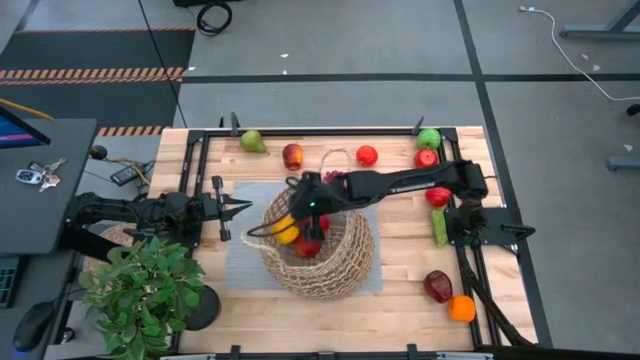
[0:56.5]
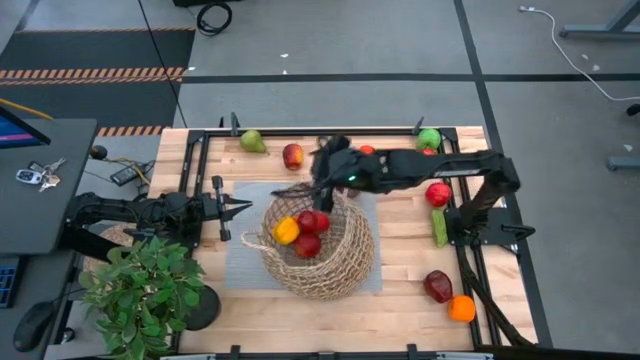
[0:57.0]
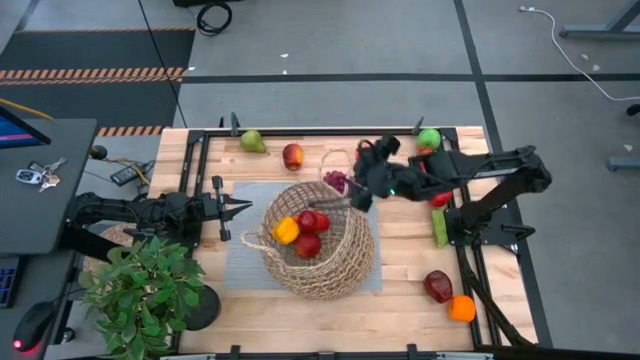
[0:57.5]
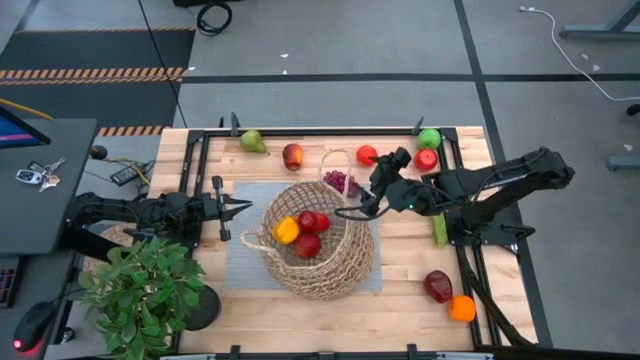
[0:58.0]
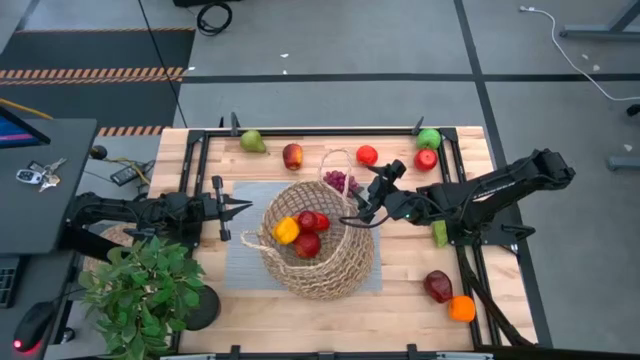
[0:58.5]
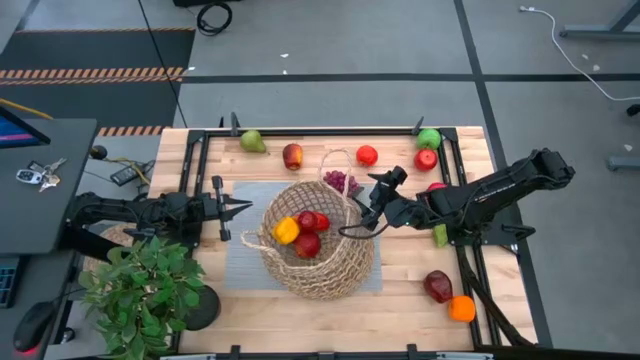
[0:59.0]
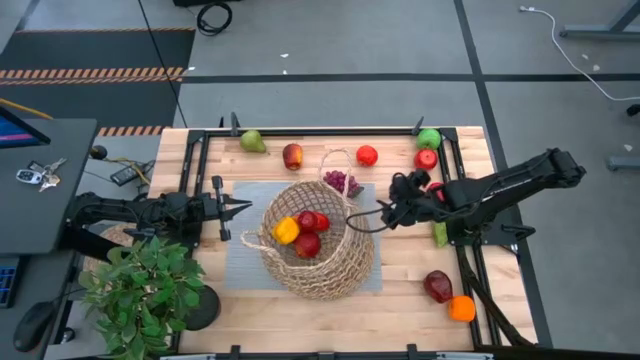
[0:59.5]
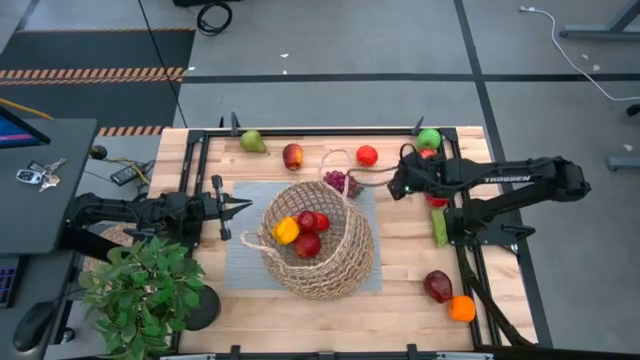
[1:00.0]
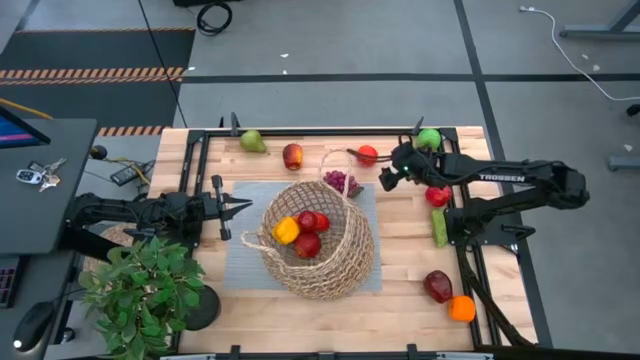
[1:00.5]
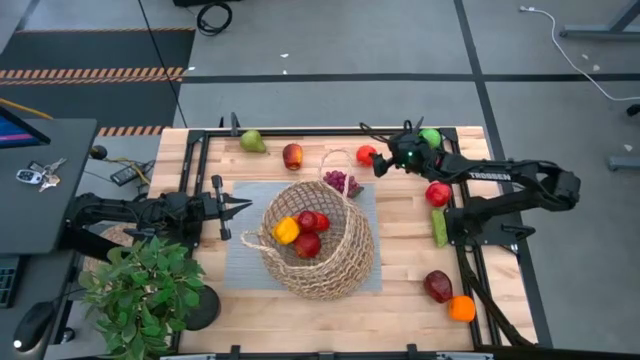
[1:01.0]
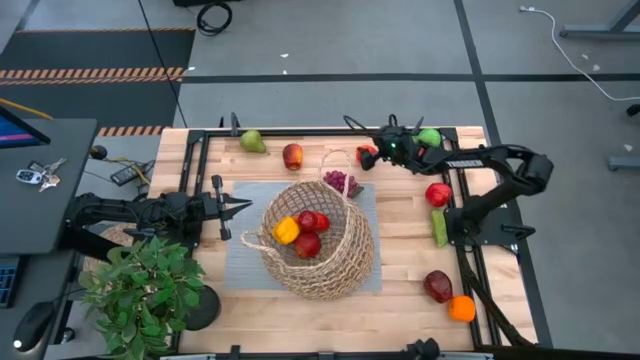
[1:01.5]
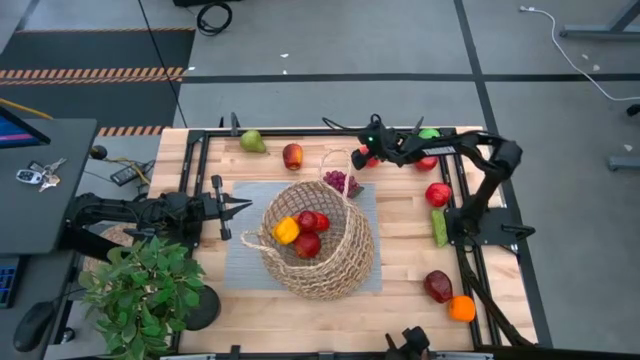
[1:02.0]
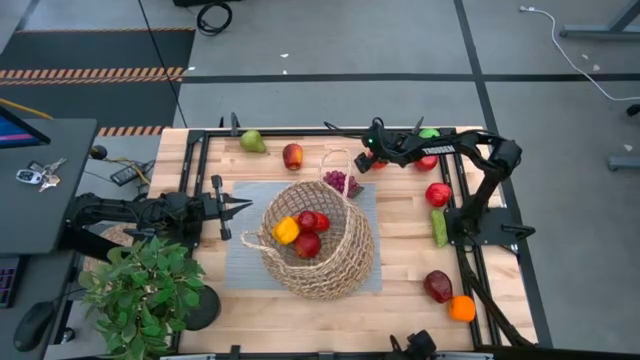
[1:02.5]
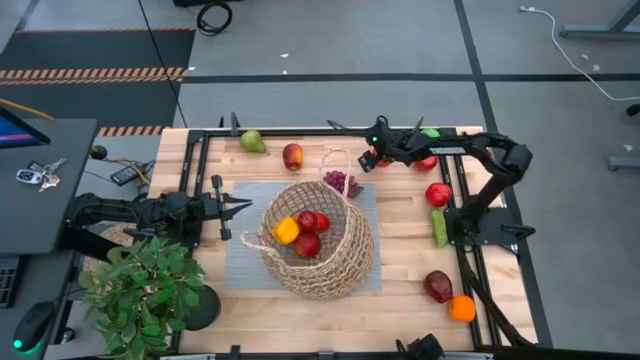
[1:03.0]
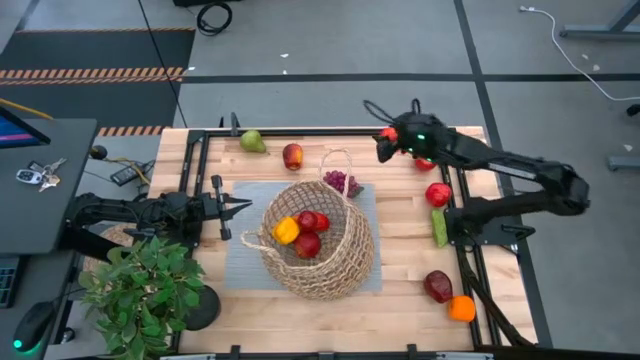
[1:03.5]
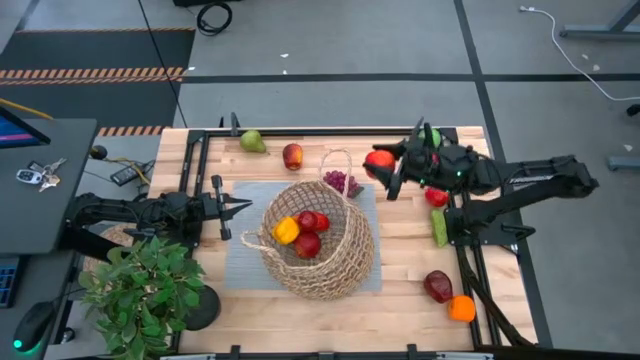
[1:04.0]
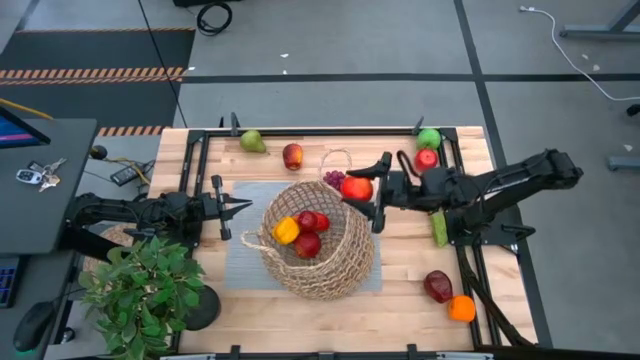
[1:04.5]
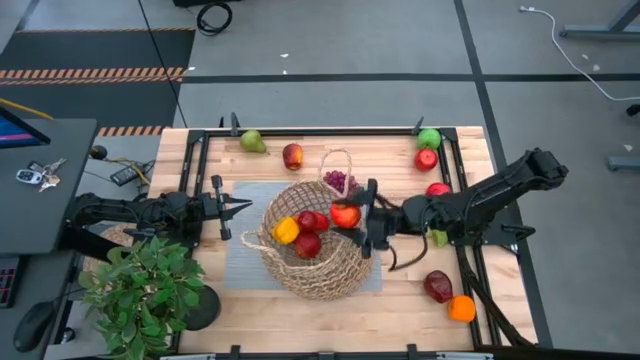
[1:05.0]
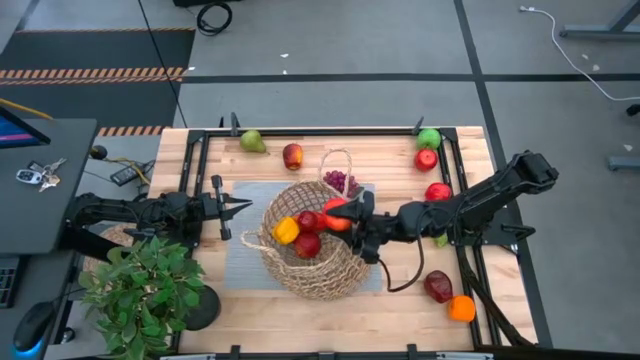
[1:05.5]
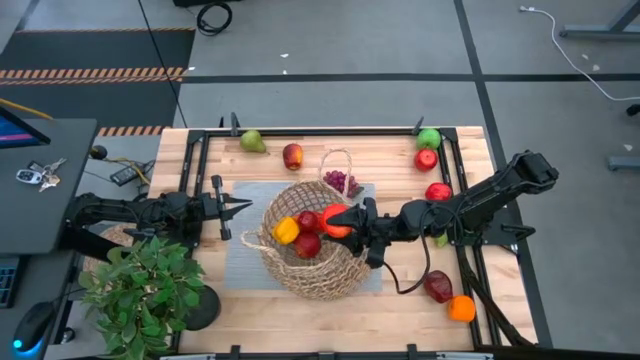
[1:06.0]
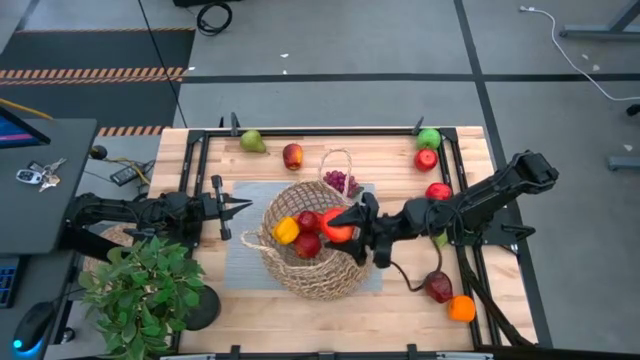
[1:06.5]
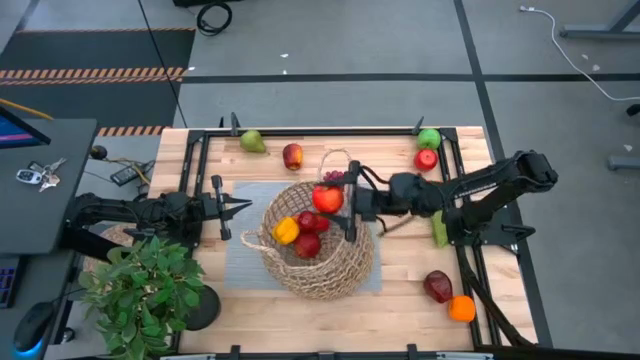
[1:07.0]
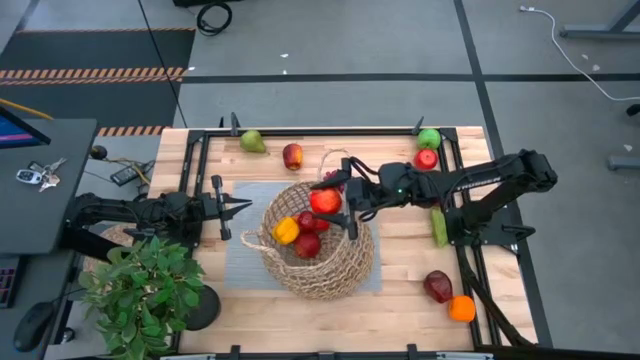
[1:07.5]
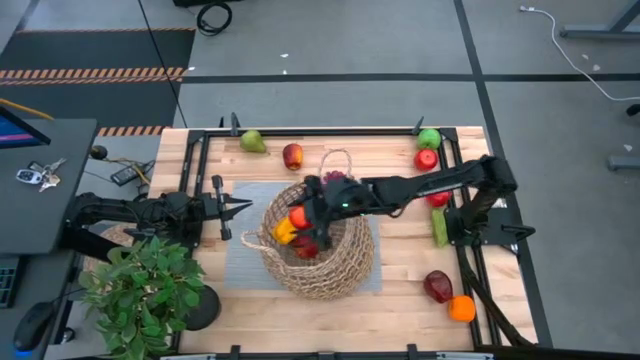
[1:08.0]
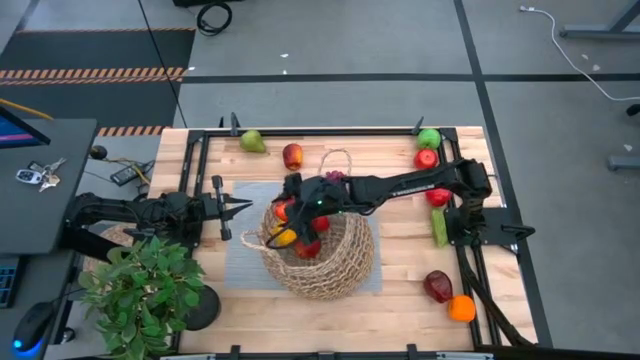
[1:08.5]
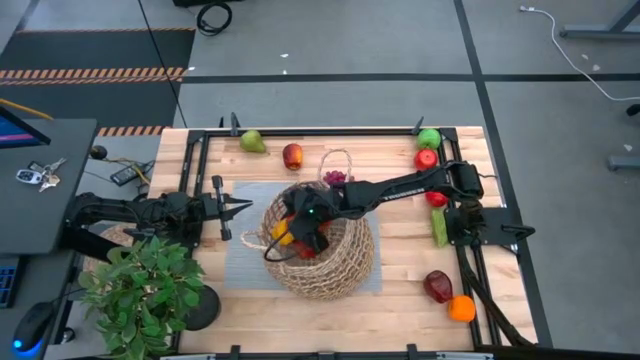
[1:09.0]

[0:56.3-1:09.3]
Task: Build produce basket
Put the red apple into the brown basket

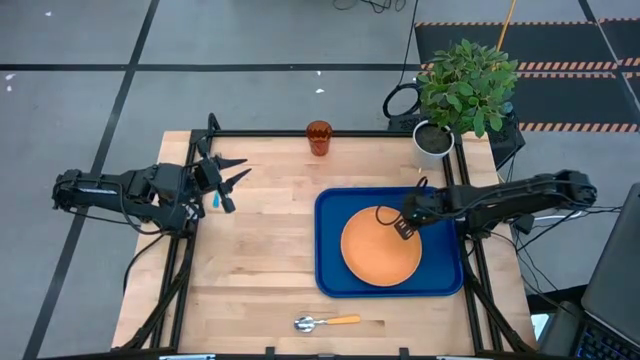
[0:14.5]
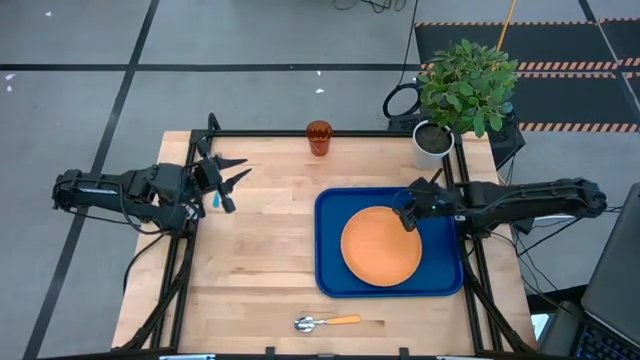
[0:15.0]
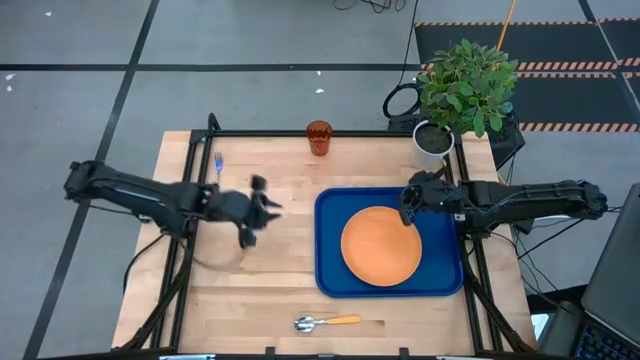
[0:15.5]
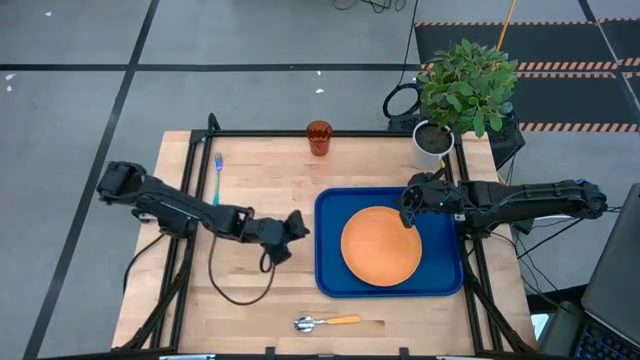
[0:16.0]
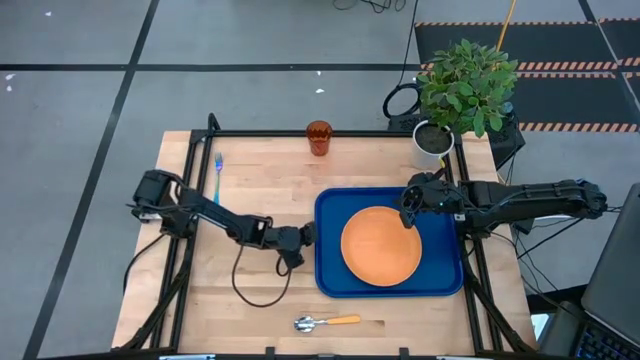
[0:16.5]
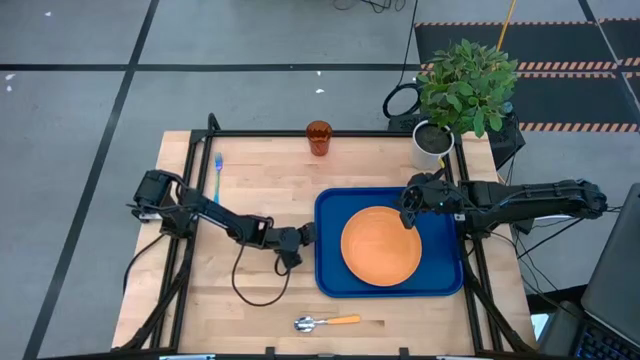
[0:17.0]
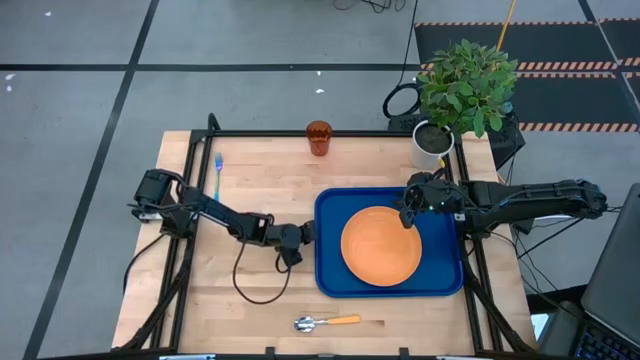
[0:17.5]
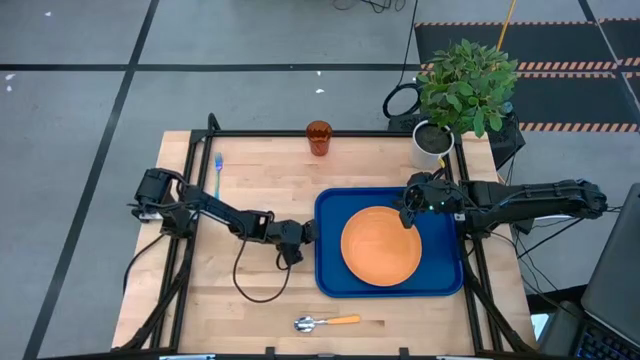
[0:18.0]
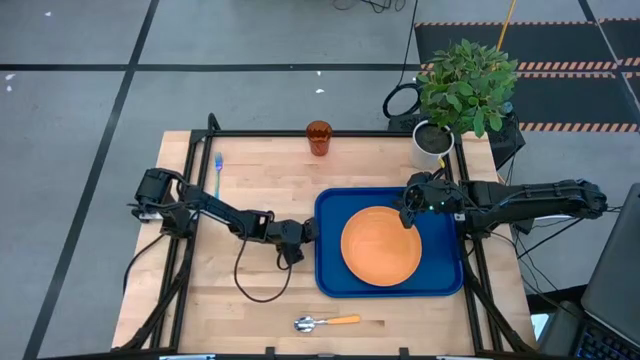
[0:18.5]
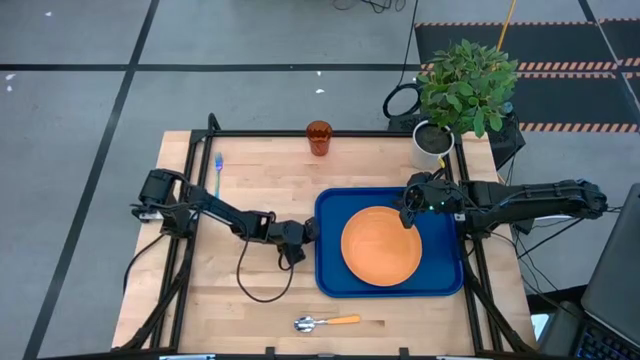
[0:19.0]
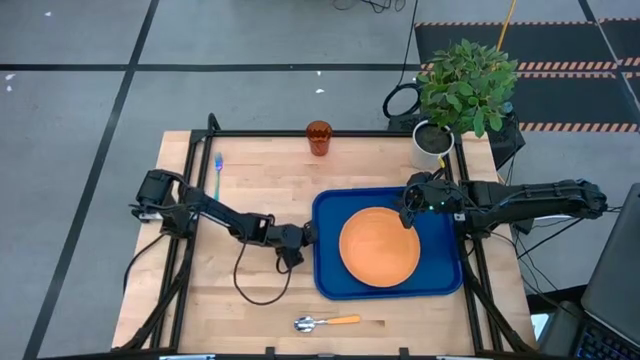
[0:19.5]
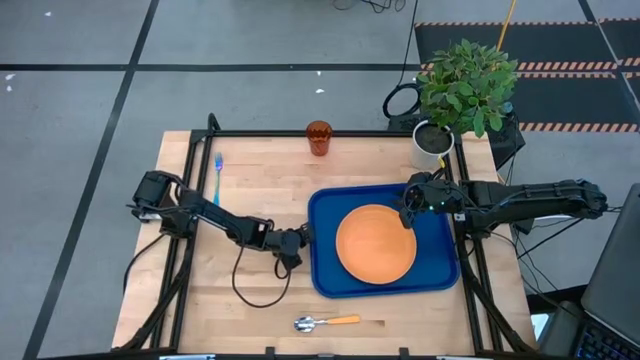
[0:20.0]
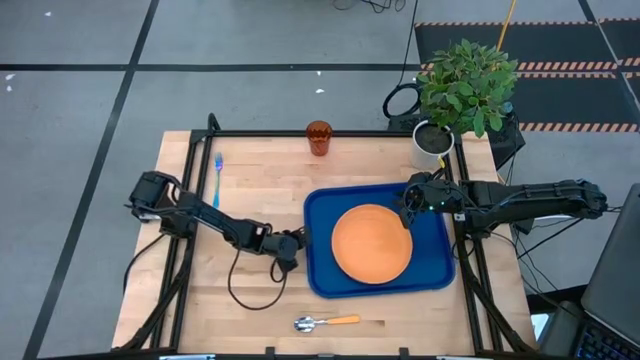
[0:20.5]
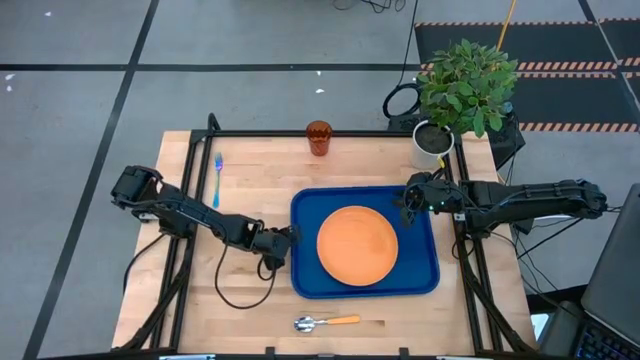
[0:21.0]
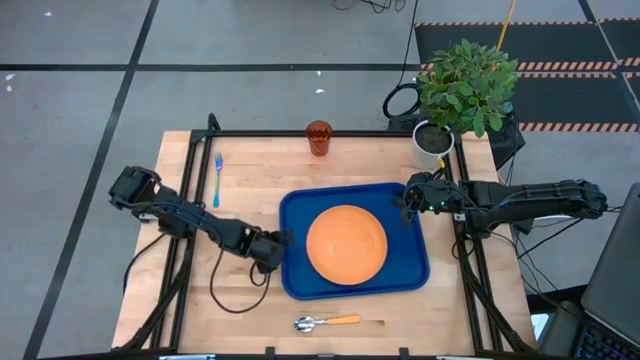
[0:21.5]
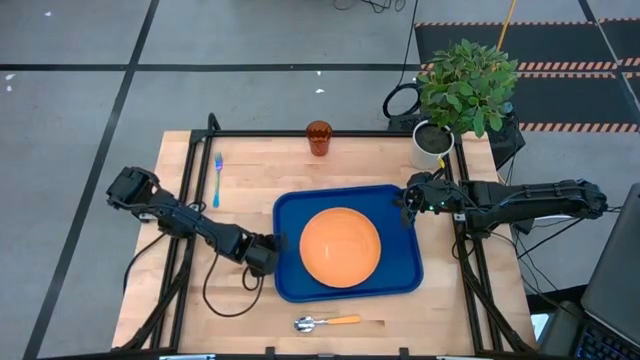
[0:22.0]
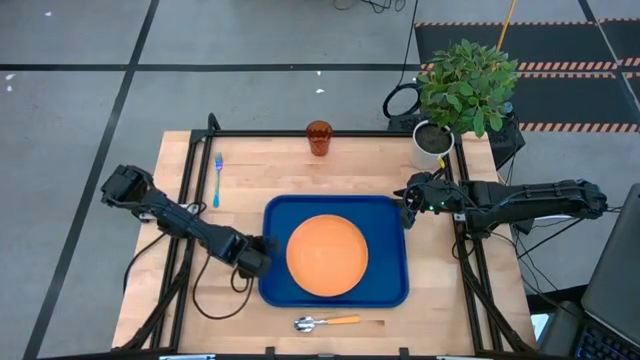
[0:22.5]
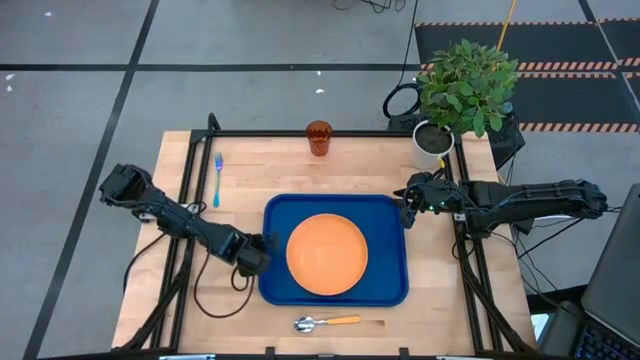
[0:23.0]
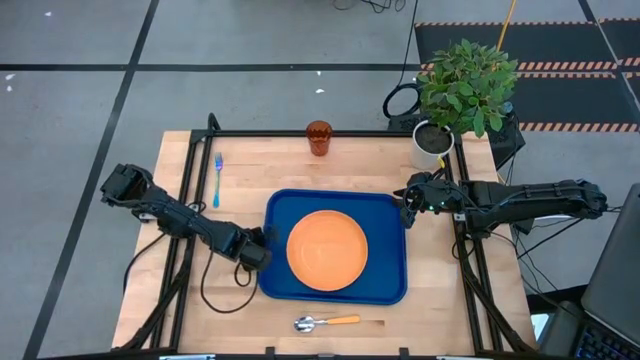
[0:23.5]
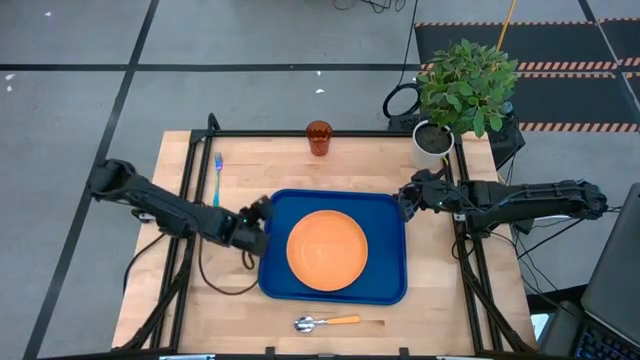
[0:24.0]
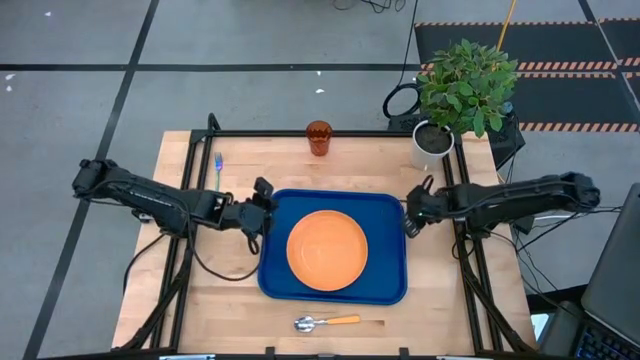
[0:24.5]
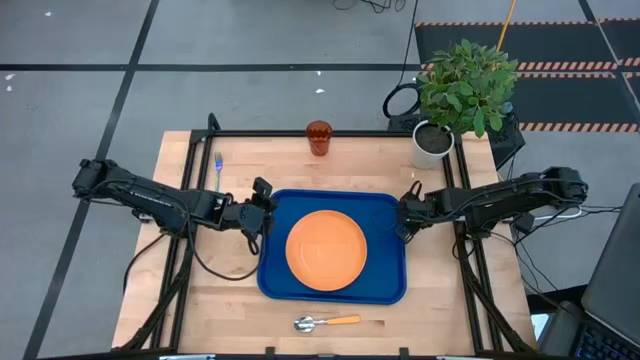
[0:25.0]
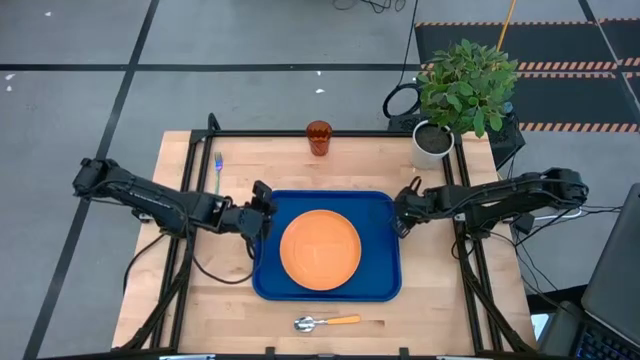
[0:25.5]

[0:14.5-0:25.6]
Task: Pick and place plate/cup/fork/spoon on tray
Move the blue serving tray to the middle of the table
